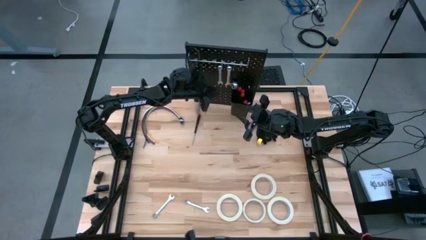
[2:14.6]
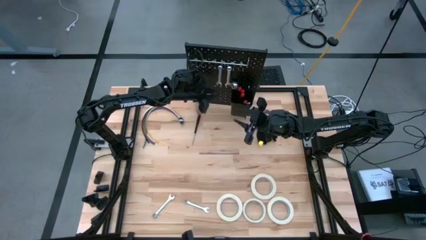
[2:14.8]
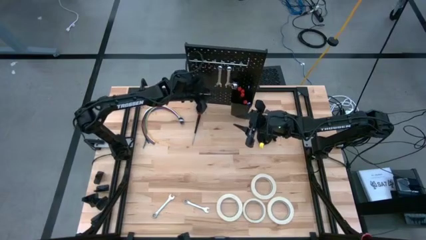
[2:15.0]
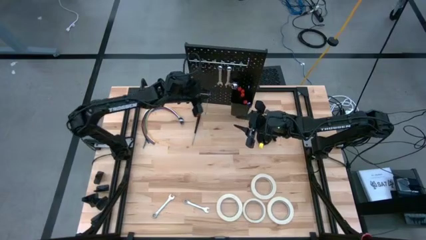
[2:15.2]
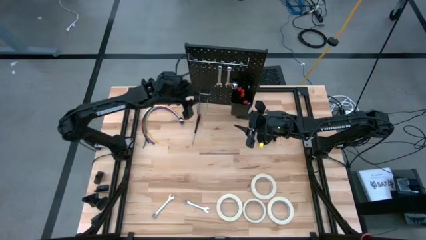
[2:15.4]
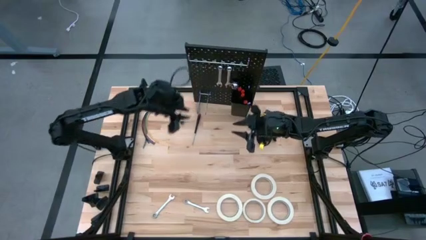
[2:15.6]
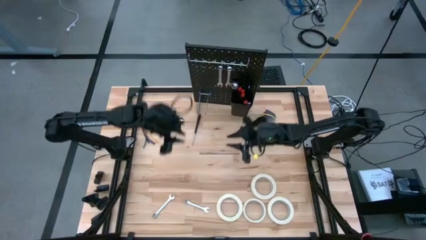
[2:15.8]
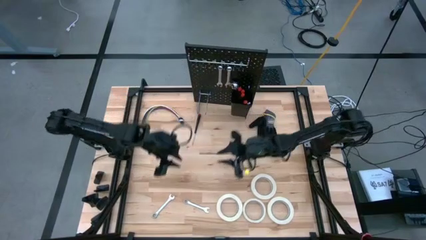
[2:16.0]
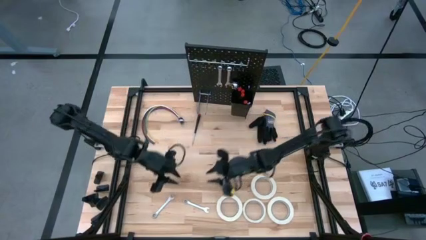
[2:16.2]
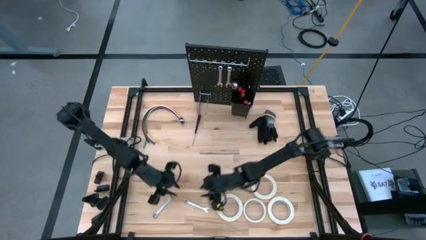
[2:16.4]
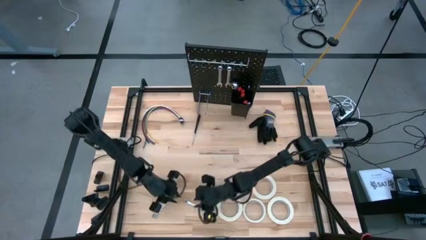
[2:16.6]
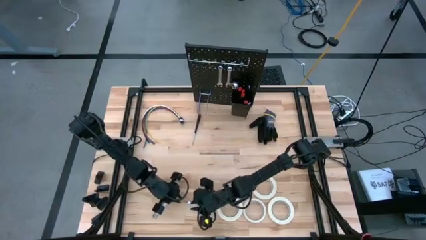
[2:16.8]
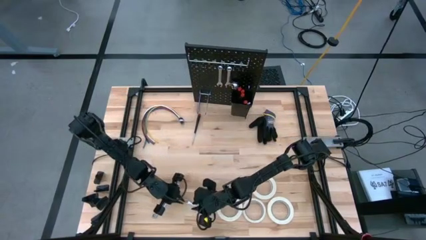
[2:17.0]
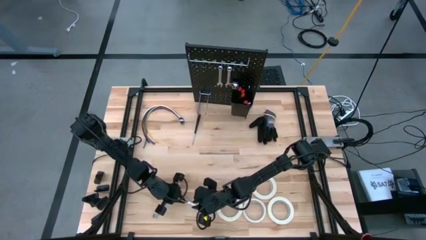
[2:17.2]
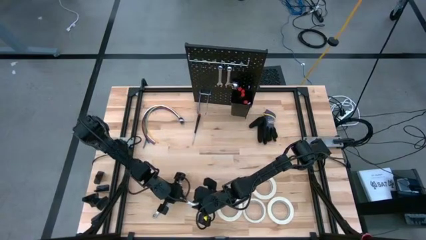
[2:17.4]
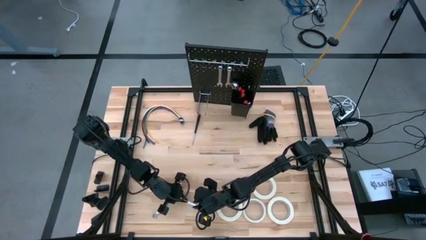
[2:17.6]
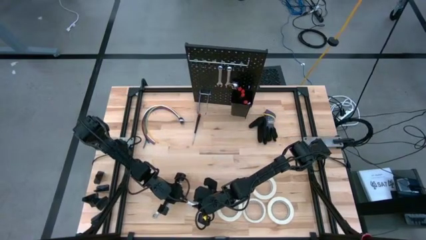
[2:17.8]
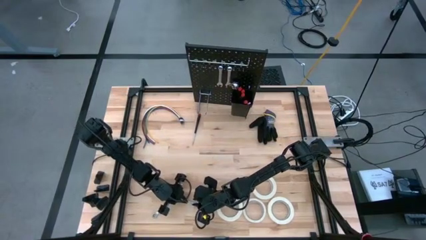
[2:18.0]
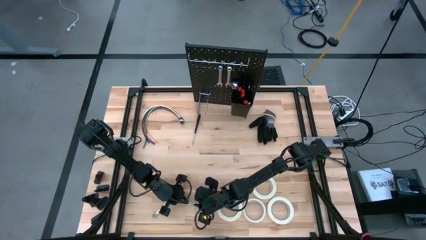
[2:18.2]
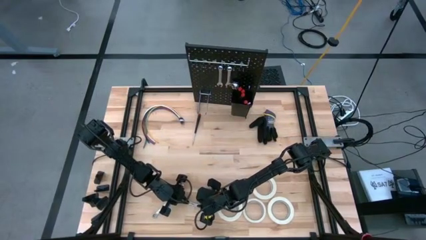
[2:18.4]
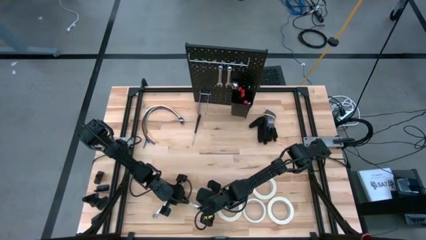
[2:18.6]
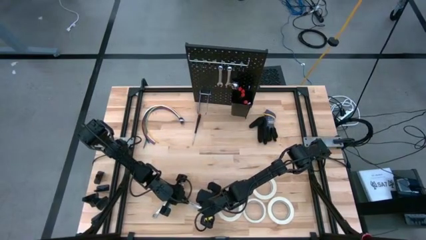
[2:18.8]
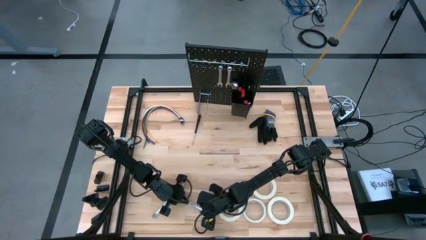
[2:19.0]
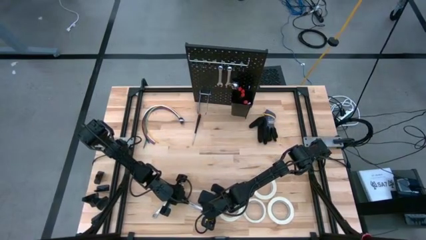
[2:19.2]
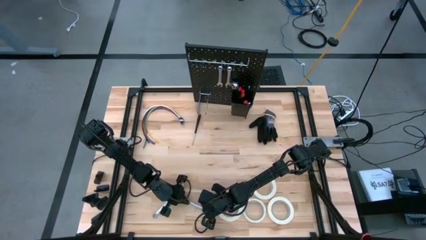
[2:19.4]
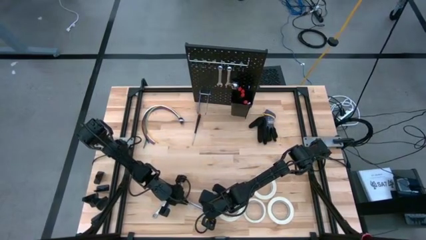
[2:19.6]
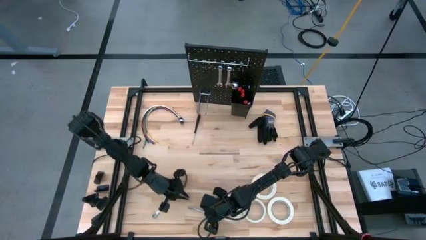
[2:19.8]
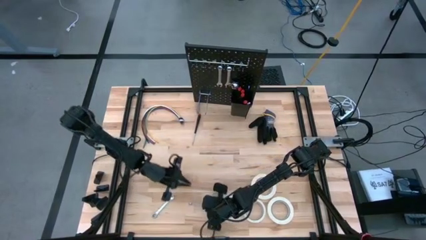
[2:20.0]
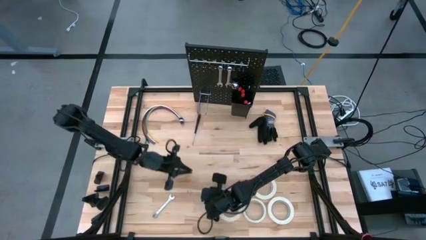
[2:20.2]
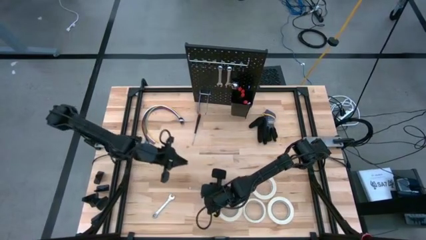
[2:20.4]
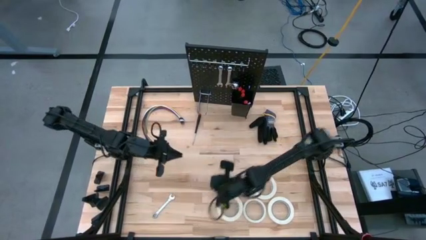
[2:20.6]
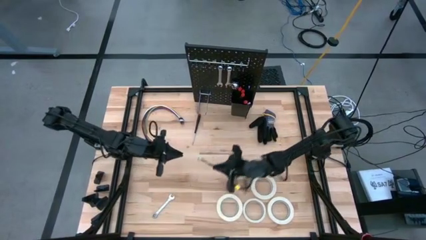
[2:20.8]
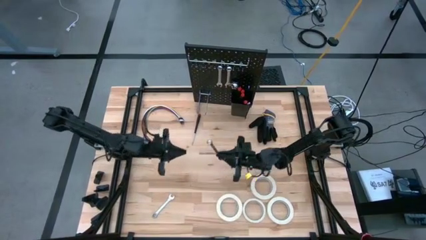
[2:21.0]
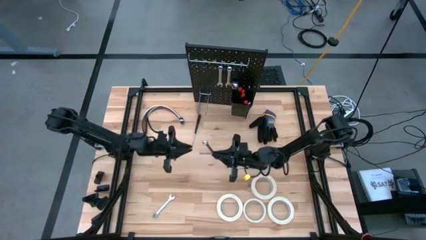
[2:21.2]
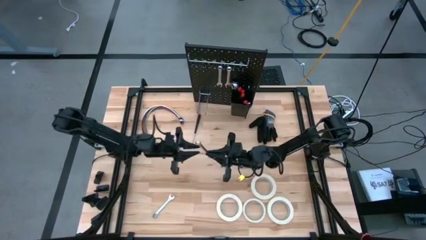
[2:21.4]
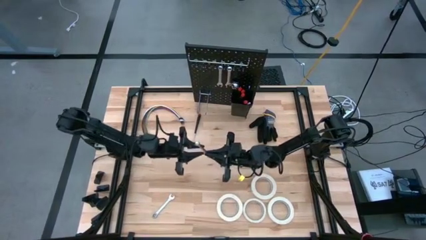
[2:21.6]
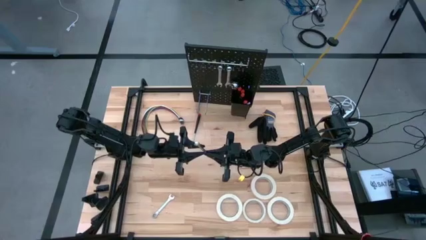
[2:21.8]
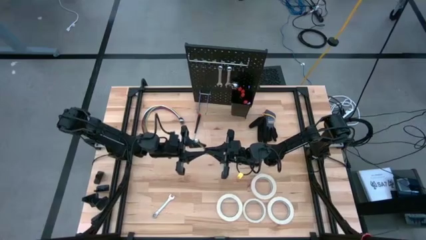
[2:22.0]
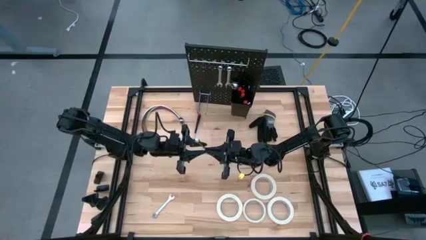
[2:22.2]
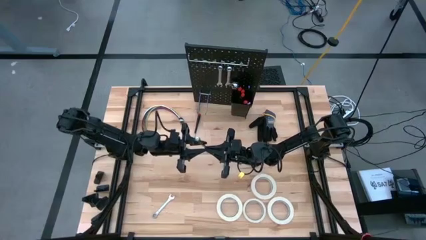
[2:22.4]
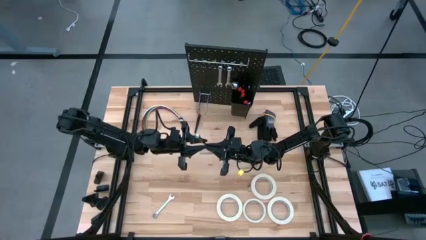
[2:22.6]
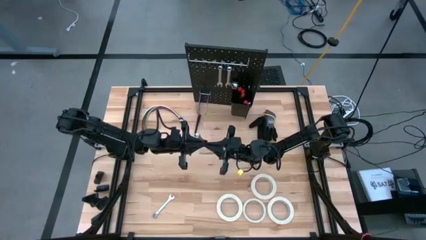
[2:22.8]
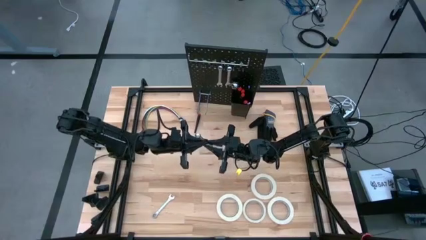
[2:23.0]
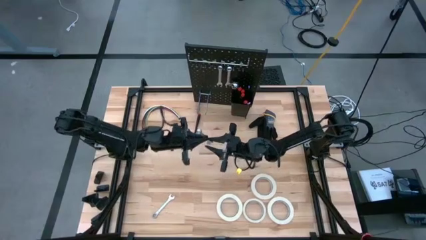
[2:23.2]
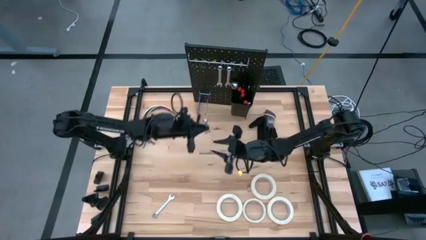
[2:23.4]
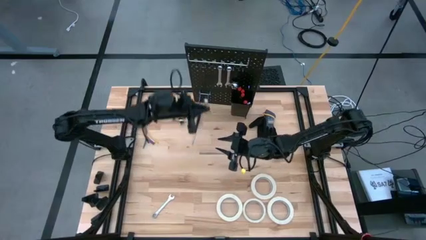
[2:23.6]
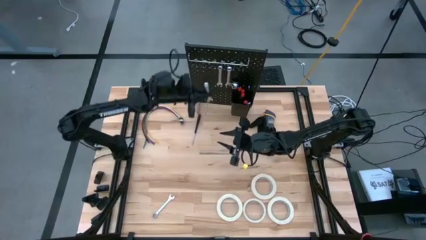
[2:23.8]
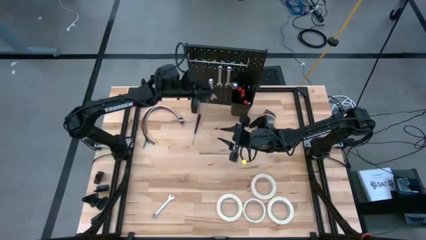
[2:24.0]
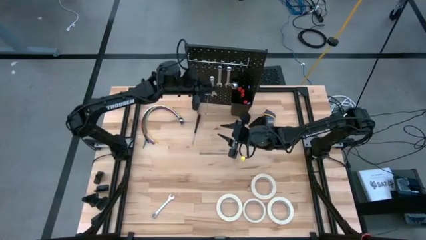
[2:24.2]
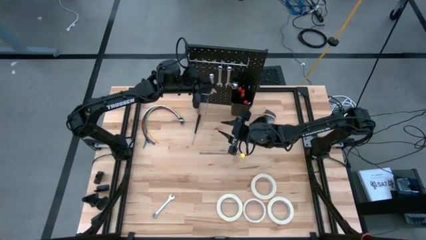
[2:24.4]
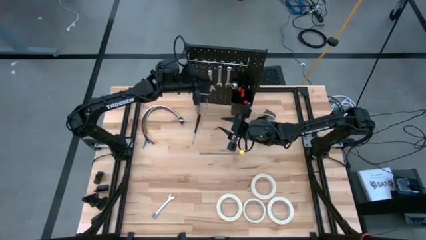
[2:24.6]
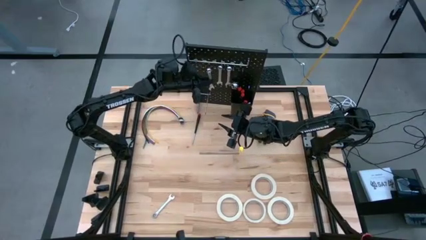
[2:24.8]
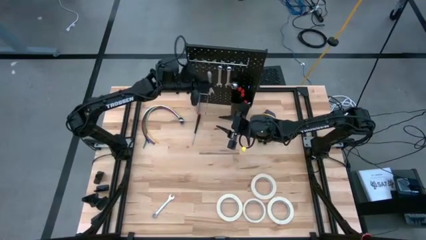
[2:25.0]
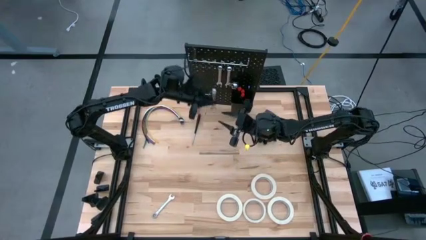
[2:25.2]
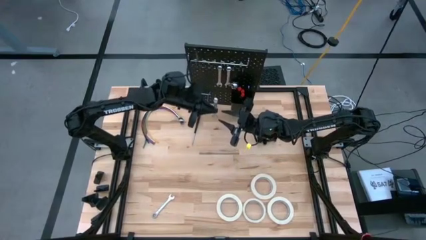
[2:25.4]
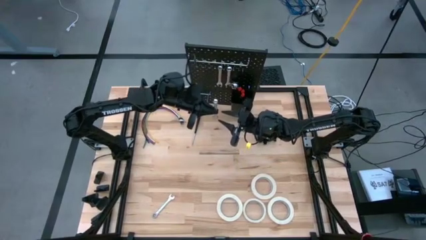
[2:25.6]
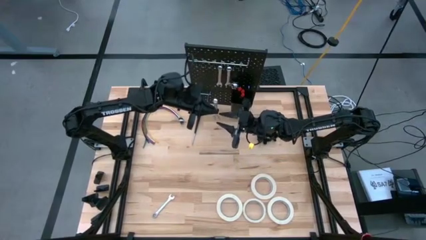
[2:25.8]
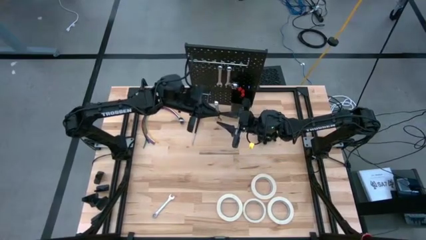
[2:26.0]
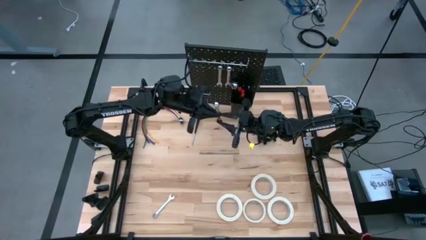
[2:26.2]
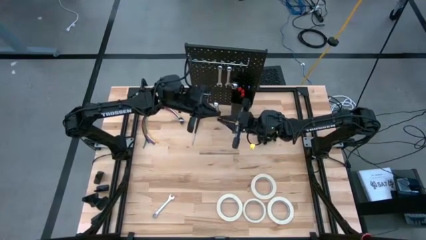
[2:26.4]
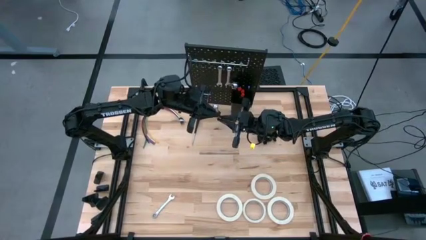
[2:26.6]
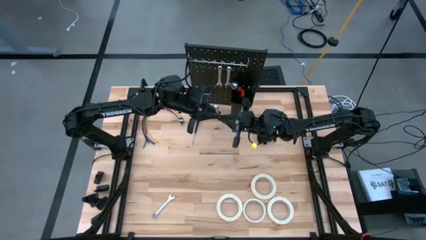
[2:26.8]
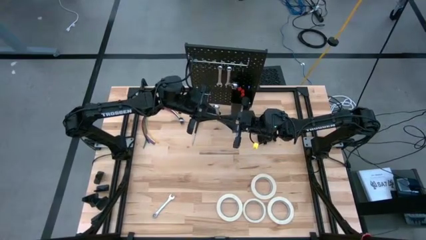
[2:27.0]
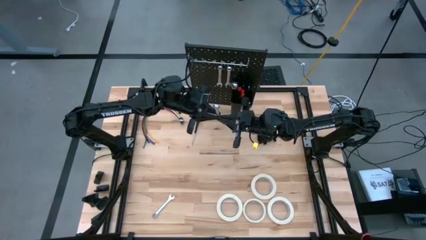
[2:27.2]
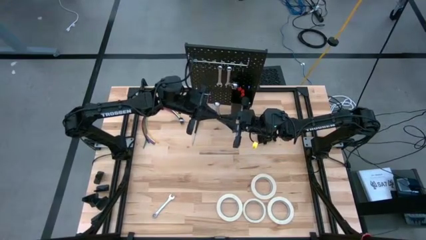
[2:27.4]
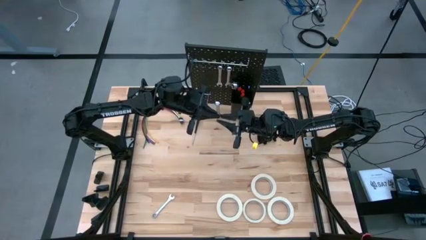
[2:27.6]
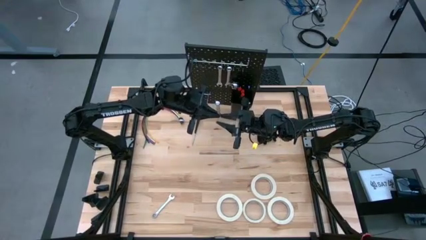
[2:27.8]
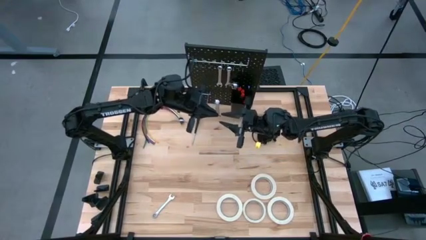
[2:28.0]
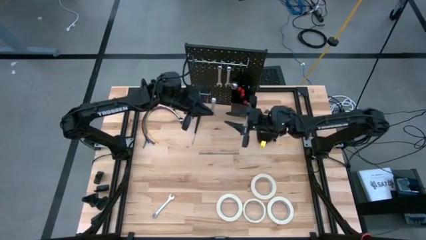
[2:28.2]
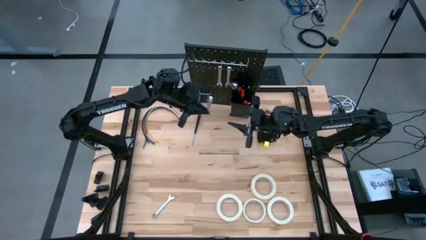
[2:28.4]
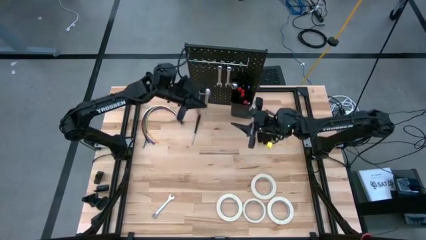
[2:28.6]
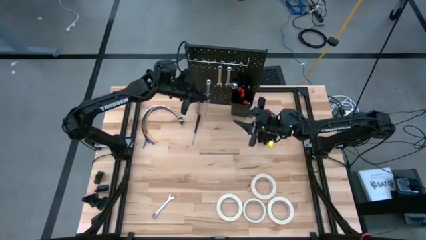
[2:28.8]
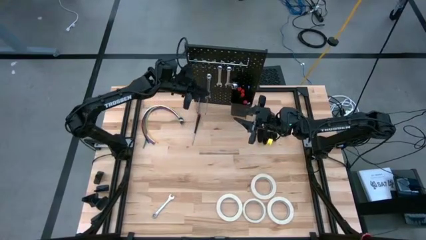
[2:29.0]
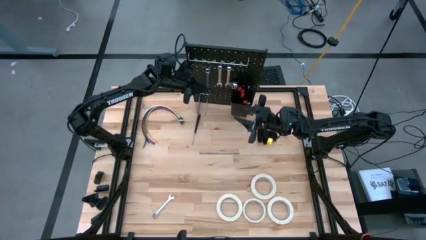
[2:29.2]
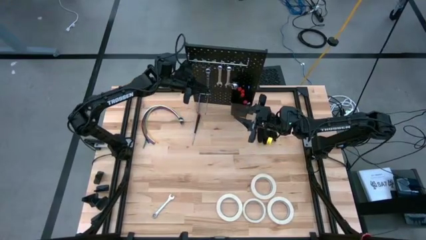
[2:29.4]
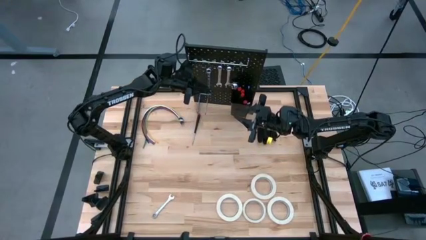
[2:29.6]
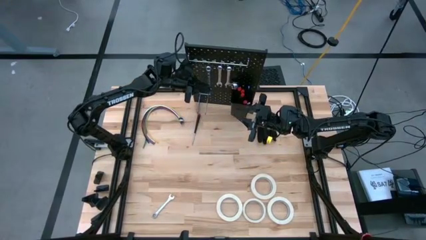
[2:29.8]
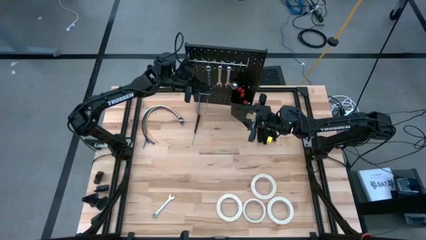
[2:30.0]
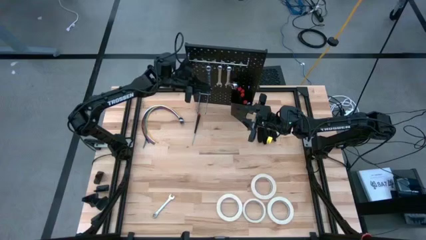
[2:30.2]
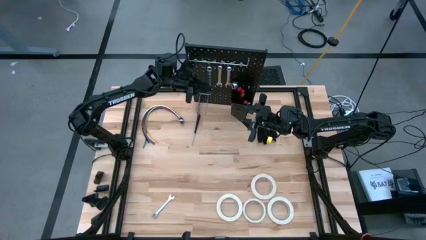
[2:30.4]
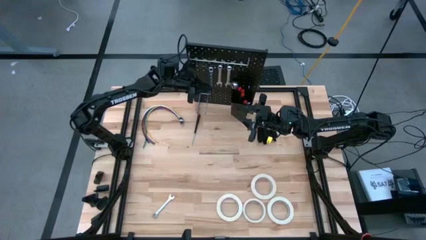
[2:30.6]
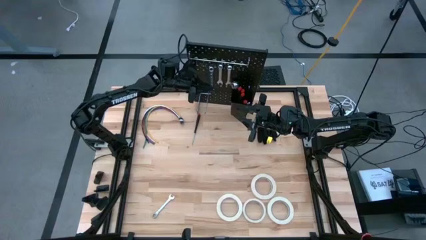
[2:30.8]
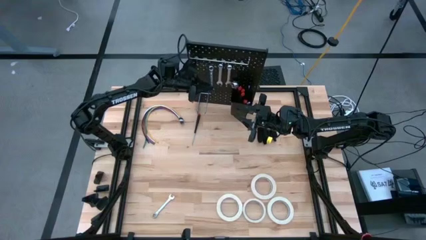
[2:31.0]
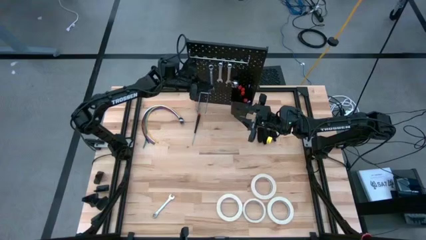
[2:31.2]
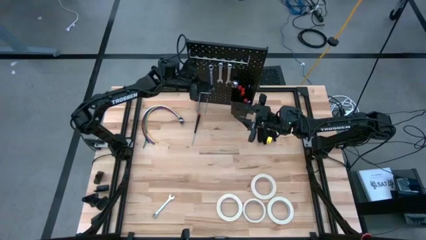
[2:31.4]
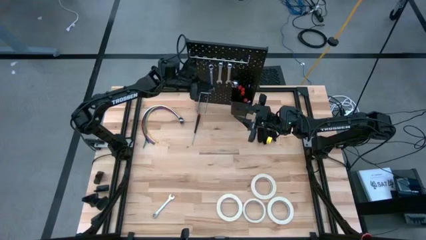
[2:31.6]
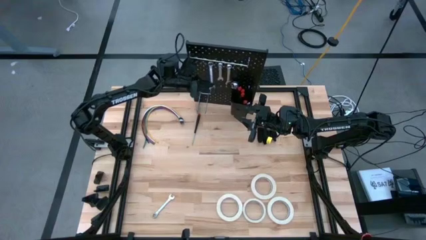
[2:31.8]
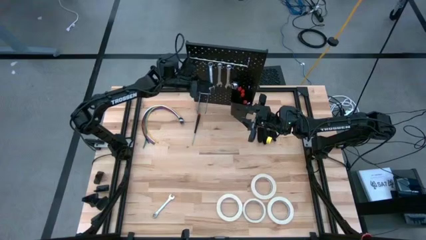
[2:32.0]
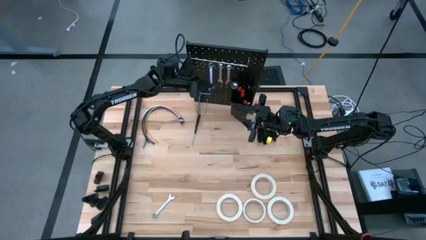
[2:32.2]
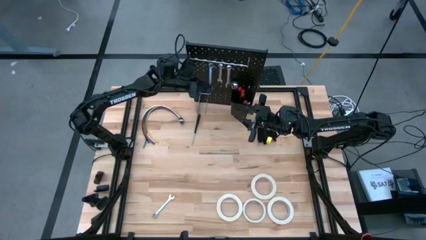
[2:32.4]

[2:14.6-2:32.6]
Task: Hang tools onto peg board
Hang the silver wrench on the peg board
